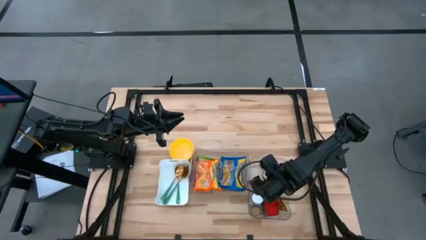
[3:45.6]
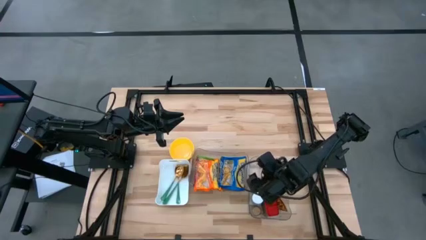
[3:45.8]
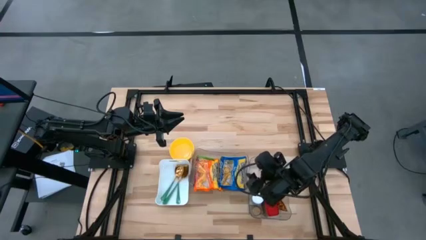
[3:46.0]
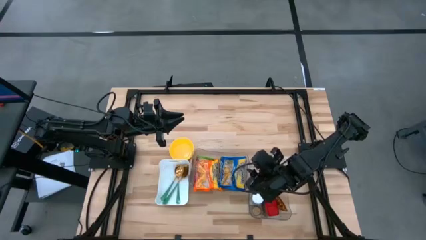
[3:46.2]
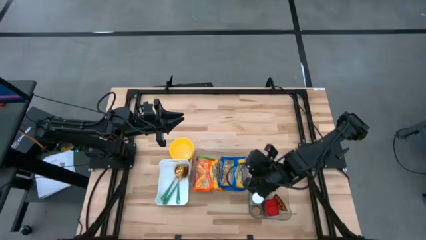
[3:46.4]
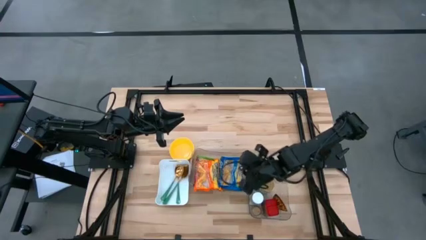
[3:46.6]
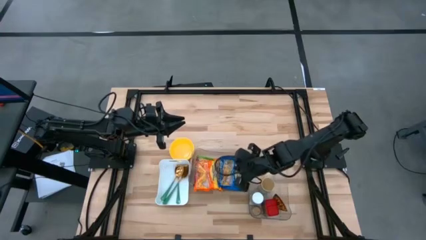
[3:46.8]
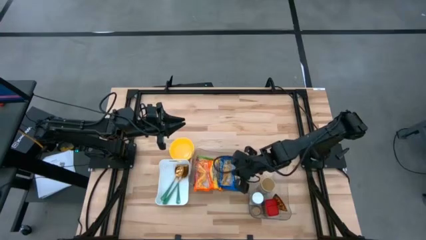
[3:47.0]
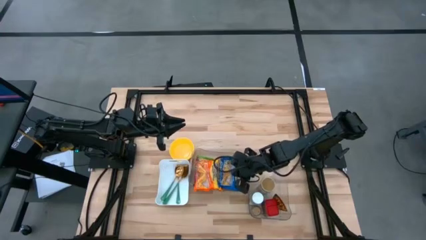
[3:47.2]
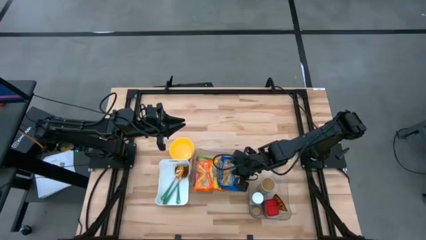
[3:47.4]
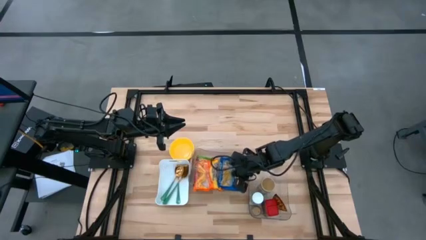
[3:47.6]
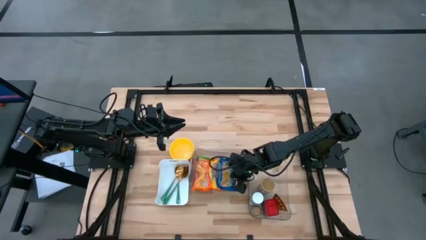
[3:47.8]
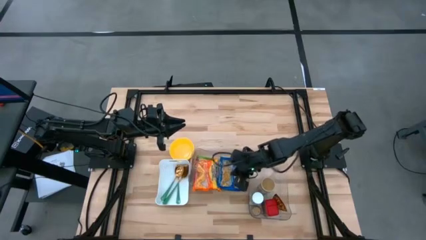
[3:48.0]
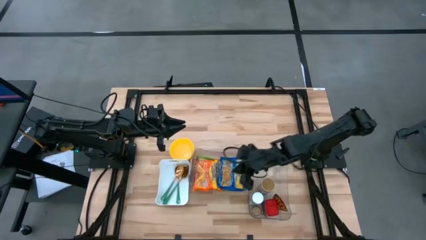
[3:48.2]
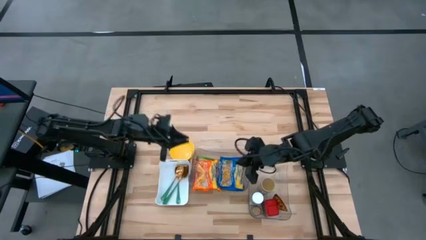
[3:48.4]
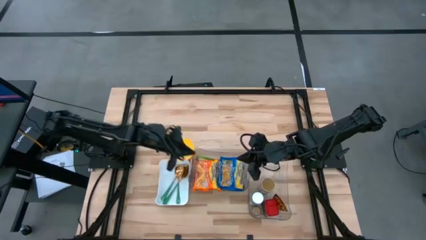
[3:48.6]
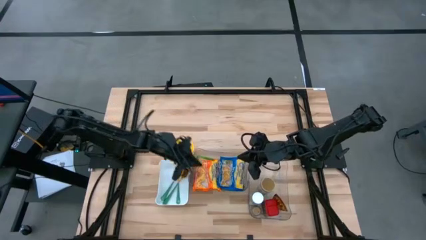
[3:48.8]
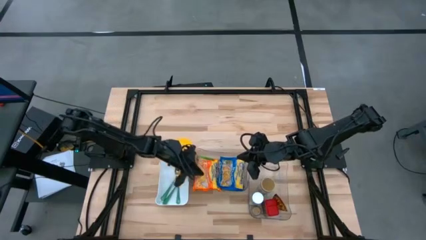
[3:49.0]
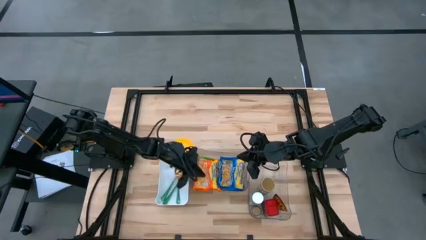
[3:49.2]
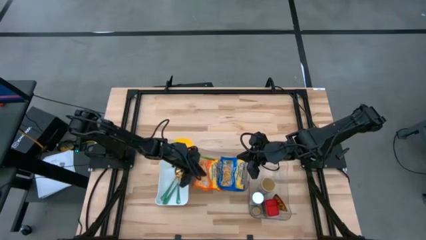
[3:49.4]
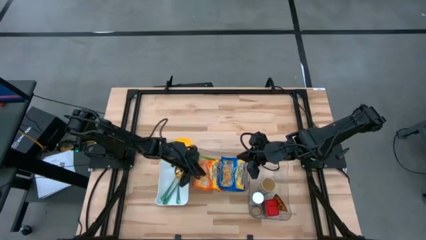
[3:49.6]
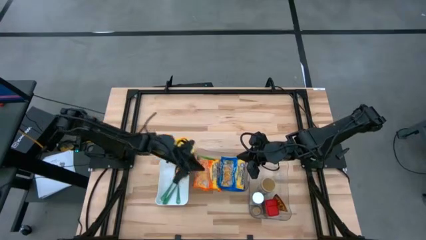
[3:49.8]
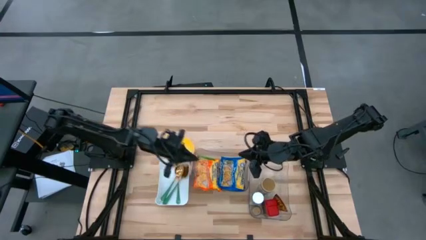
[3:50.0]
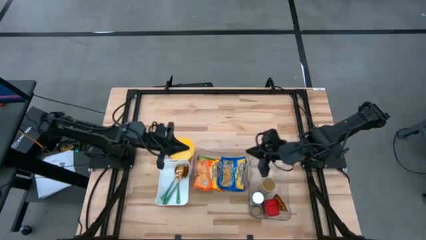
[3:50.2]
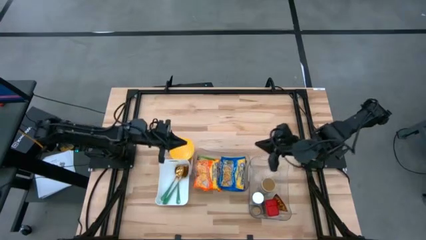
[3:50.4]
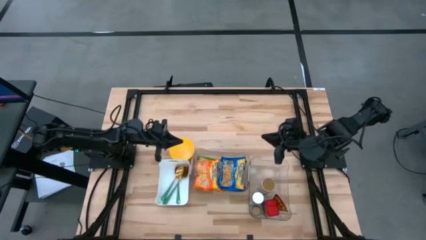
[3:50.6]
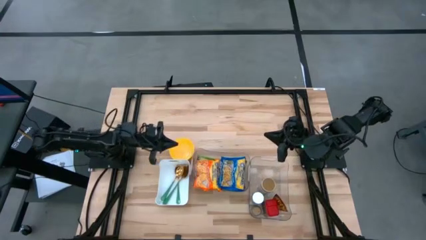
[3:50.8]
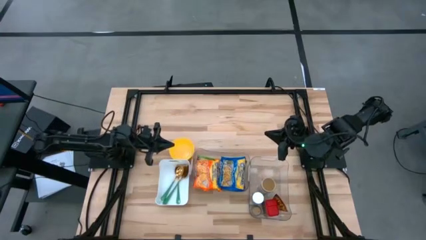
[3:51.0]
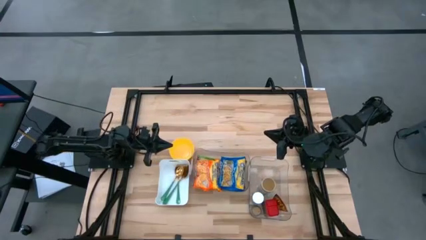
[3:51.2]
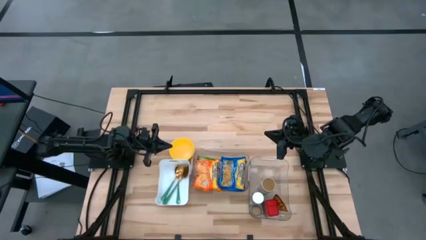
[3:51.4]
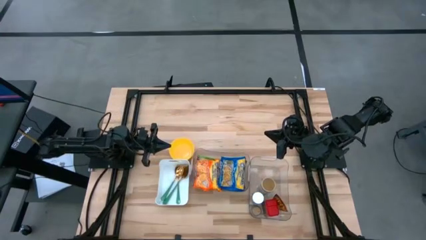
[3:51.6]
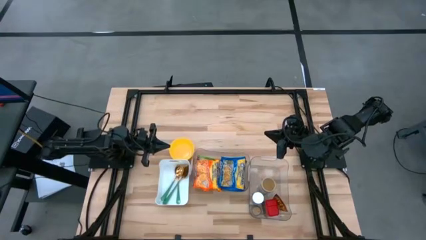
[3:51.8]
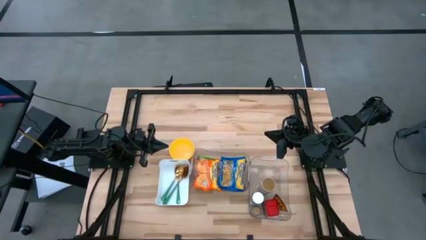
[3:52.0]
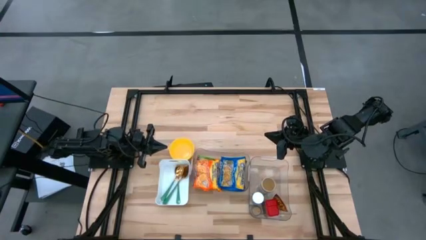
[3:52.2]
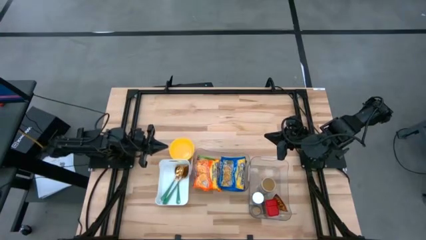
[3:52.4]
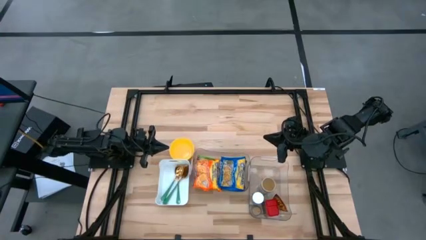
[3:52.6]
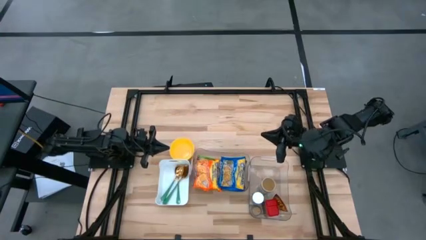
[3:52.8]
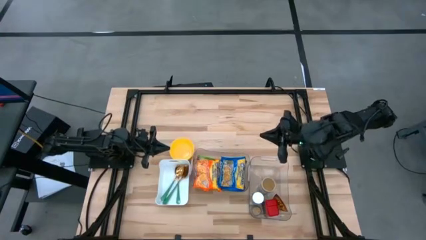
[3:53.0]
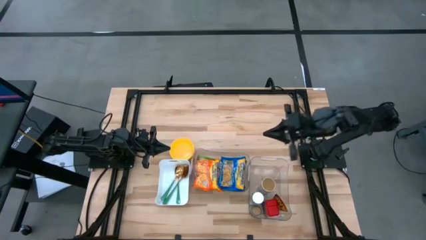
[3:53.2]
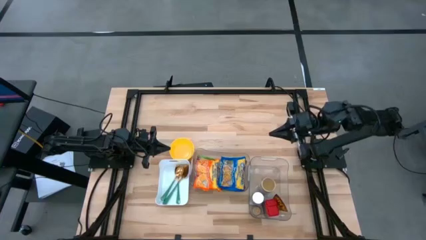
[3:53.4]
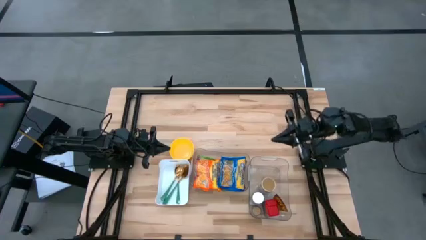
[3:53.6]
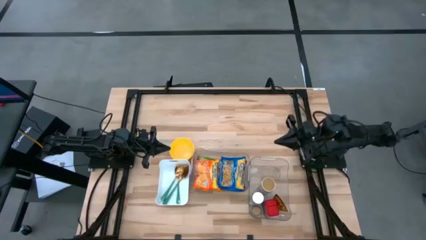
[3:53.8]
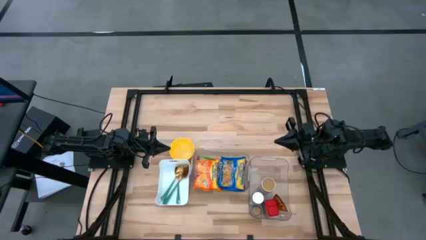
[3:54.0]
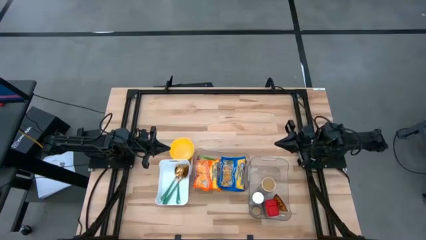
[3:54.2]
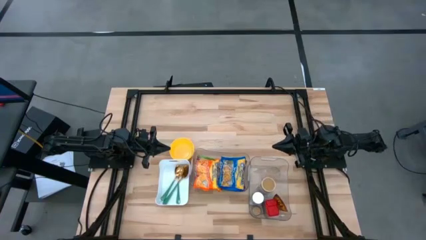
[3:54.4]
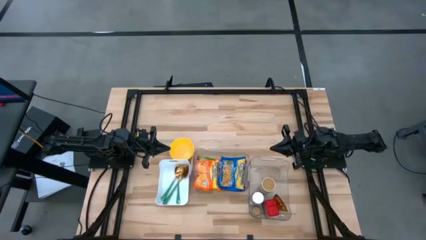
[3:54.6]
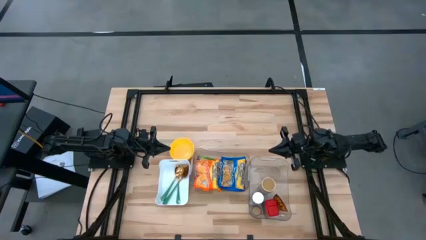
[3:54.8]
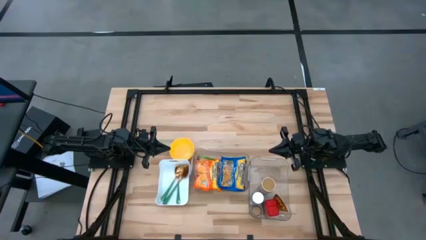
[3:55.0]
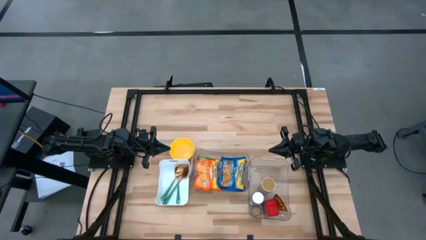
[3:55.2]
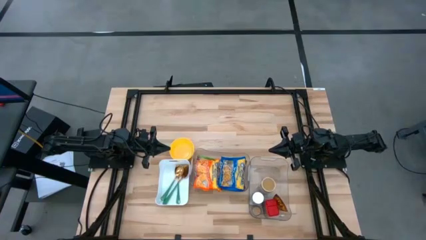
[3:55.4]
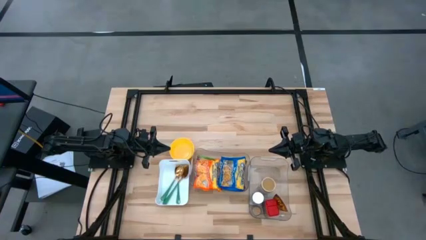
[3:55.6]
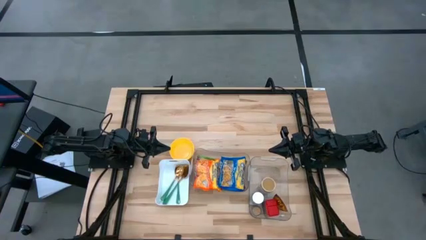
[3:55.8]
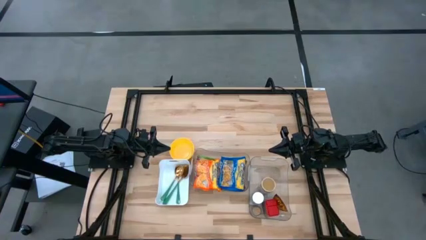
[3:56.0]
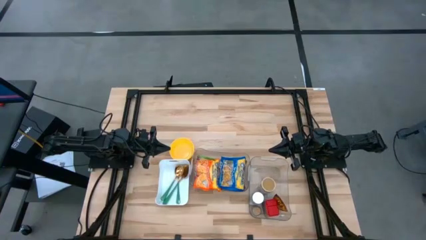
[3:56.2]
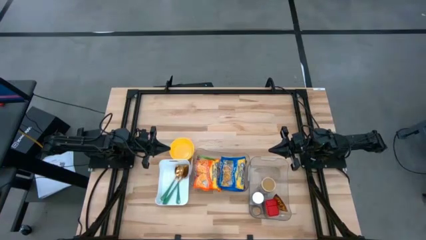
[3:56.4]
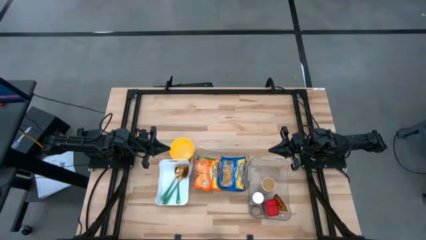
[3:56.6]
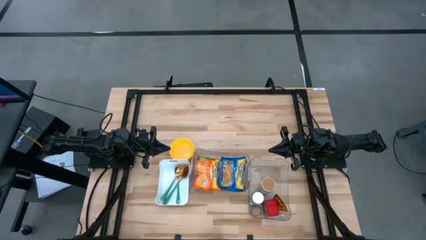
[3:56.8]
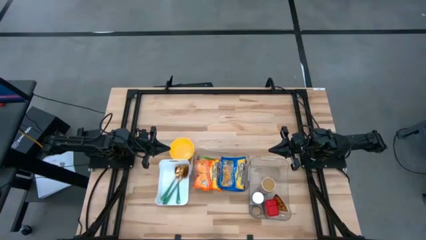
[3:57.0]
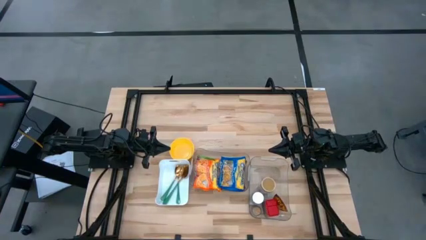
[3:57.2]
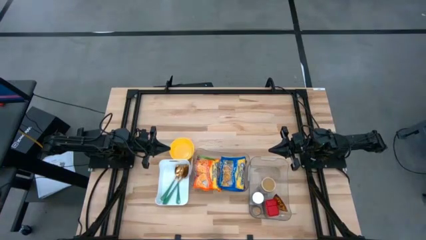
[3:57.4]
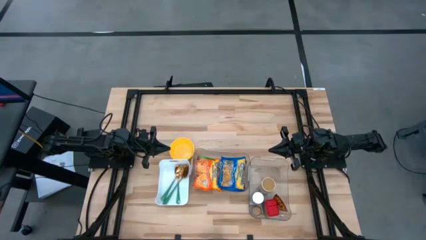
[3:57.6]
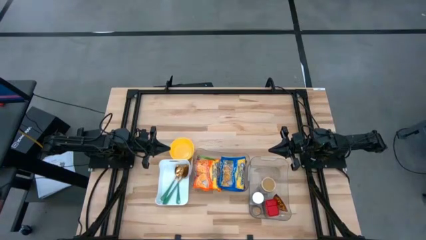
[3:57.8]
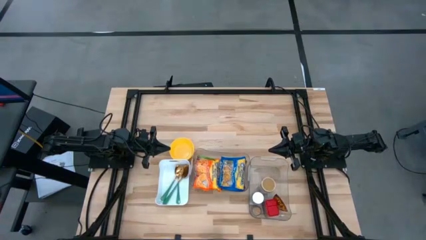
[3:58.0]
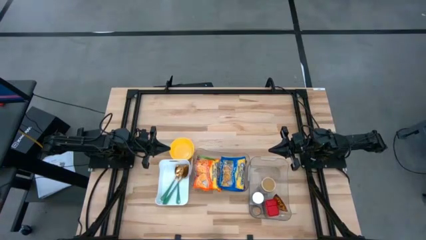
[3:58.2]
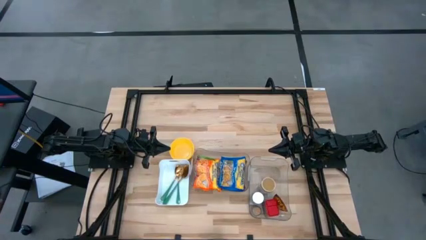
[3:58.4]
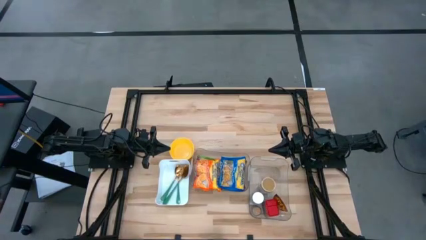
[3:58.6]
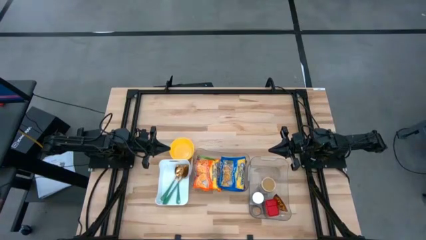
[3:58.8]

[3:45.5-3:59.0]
Task: Pick & Place Food Item
Return to Home Position

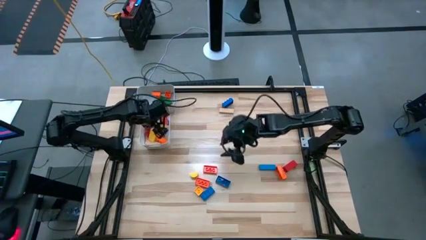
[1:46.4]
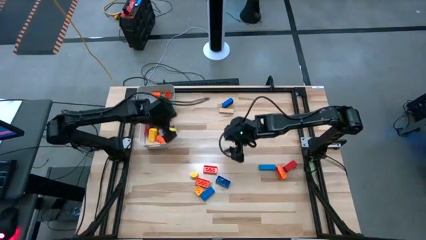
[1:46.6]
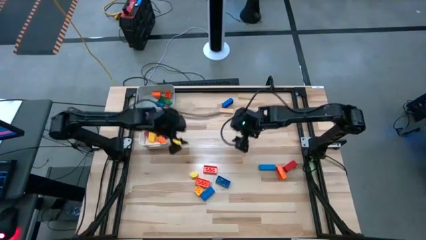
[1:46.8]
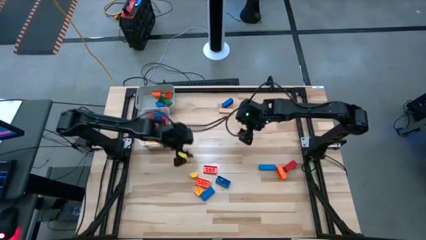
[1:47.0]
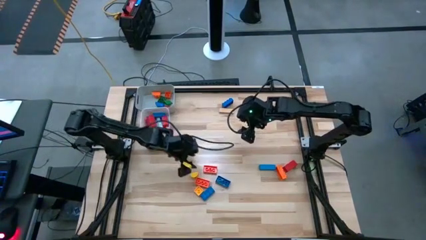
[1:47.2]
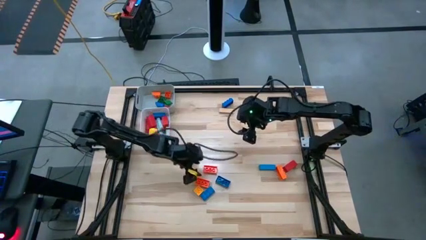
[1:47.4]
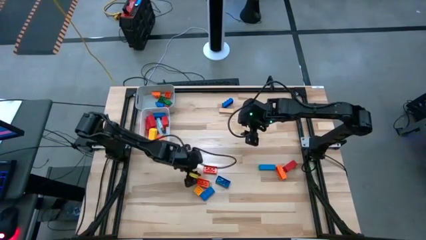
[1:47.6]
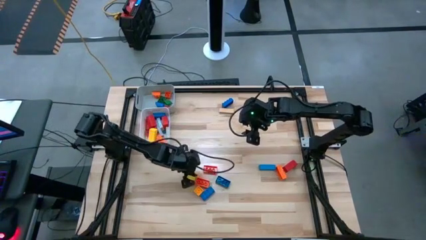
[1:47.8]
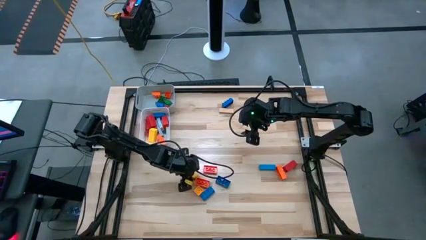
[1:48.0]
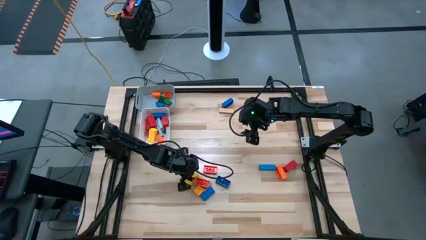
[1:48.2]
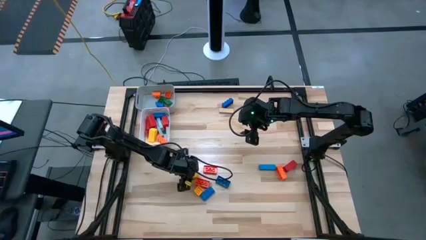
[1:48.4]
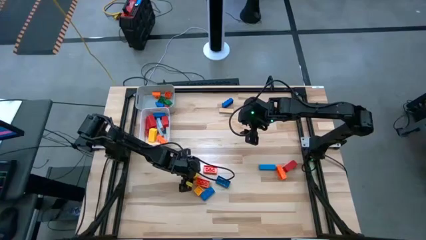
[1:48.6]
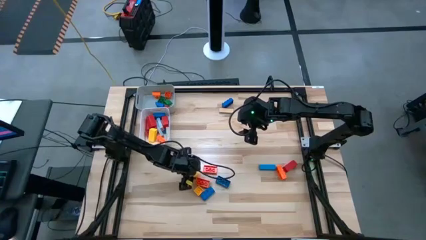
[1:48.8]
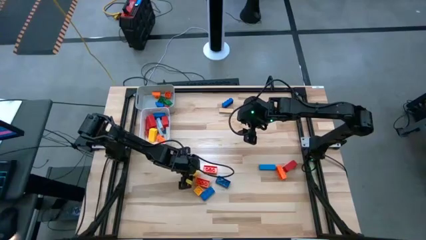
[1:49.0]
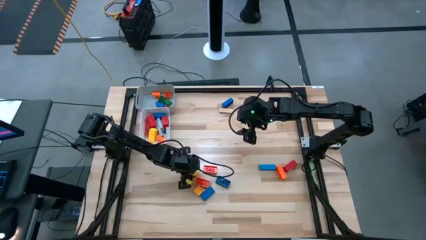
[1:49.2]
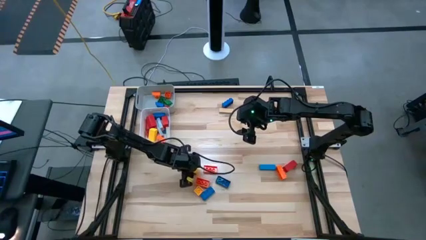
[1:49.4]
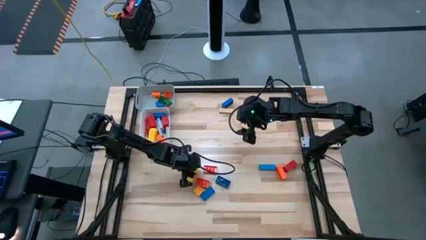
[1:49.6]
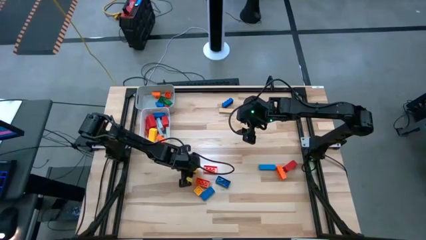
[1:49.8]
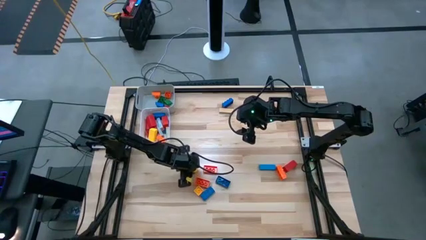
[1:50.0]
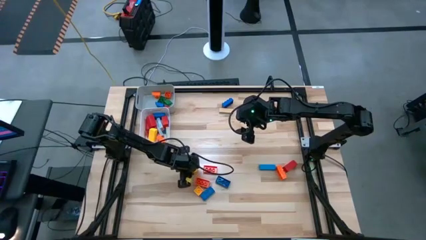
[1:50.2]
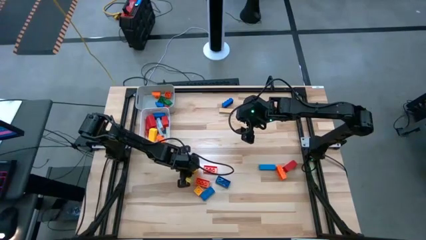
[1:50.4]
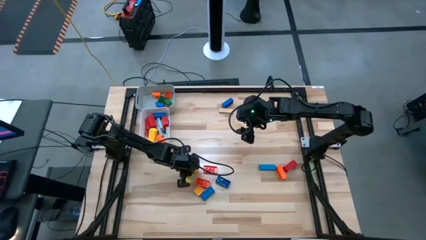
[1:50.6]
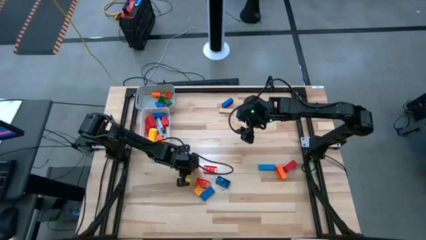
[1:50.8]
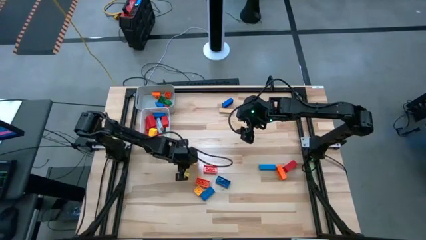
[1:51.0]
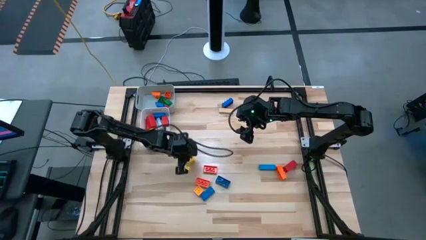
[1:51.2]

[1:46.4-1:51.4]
Task: Sort blocks by size
Put the small yellow wooden block into the gray bin
